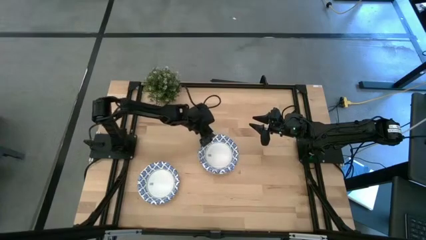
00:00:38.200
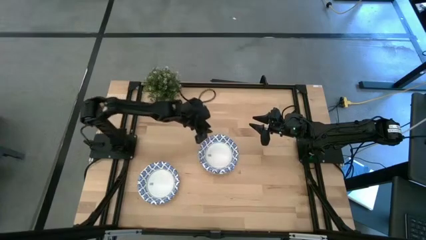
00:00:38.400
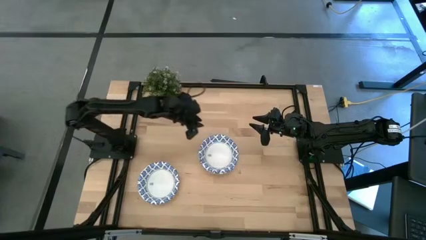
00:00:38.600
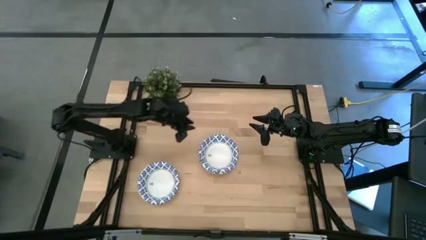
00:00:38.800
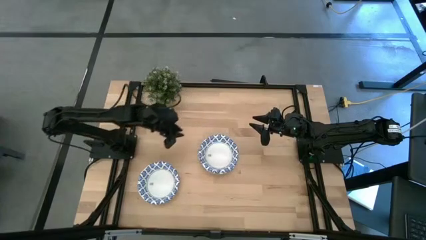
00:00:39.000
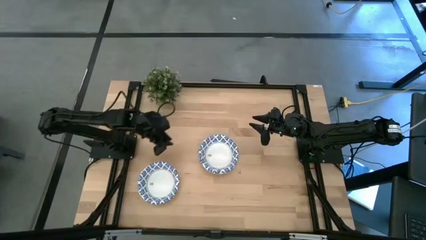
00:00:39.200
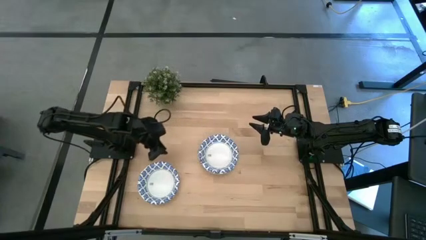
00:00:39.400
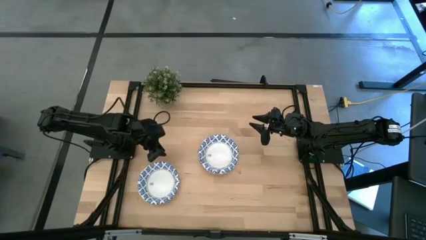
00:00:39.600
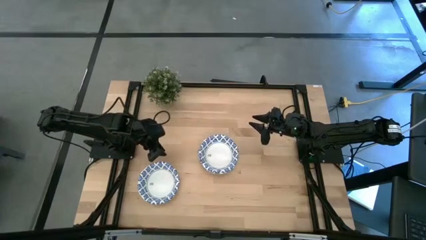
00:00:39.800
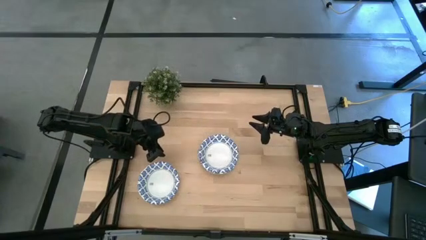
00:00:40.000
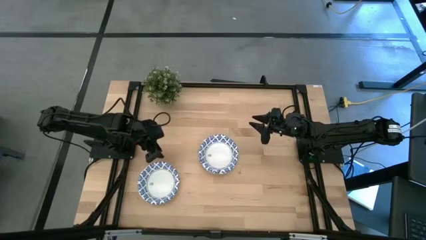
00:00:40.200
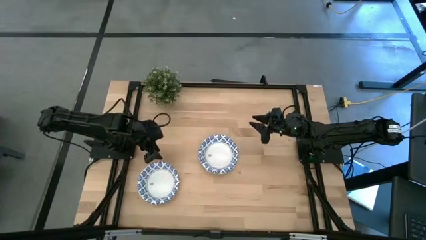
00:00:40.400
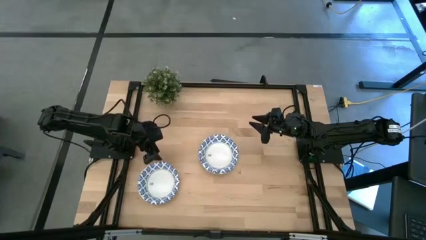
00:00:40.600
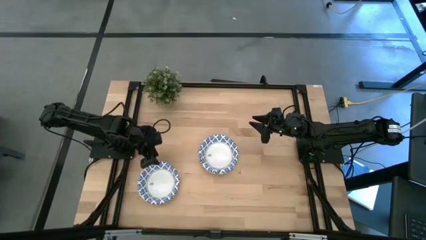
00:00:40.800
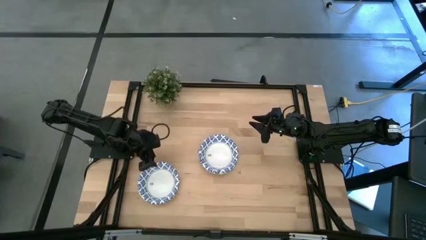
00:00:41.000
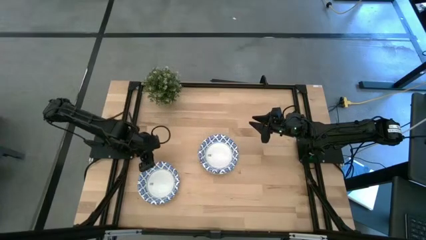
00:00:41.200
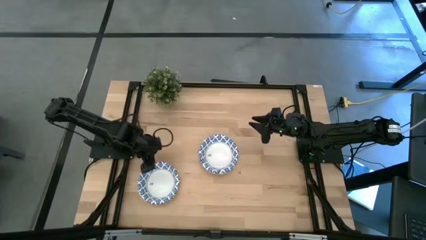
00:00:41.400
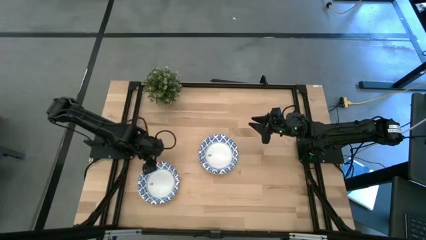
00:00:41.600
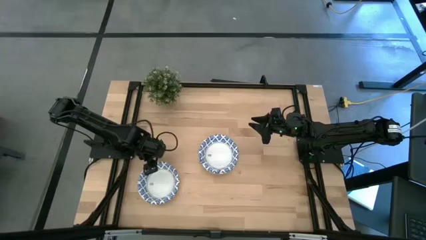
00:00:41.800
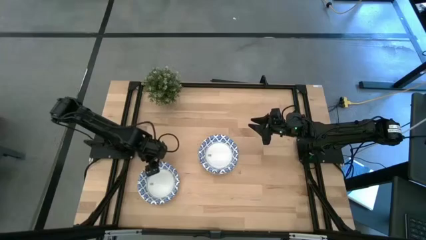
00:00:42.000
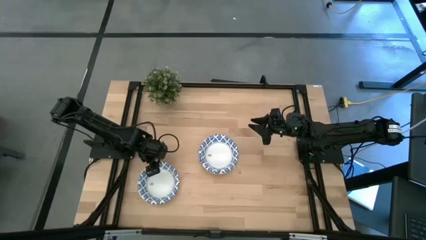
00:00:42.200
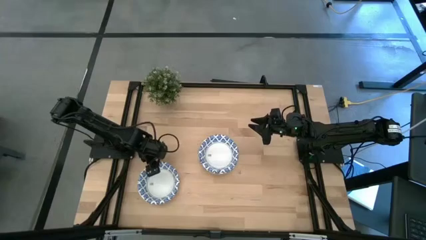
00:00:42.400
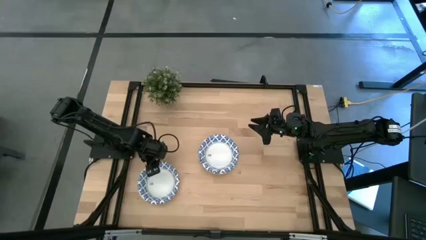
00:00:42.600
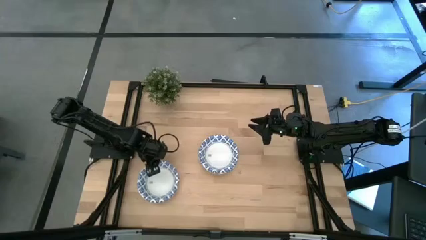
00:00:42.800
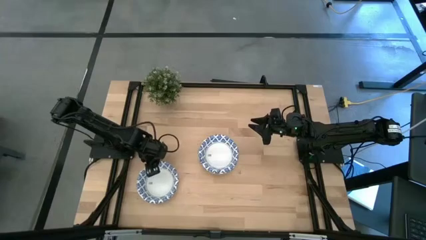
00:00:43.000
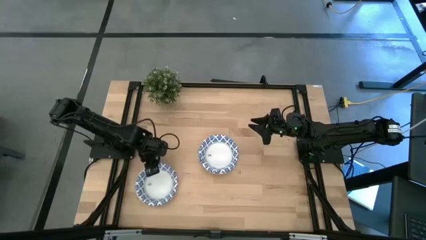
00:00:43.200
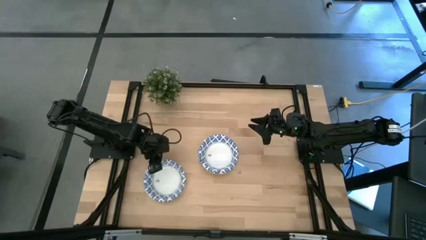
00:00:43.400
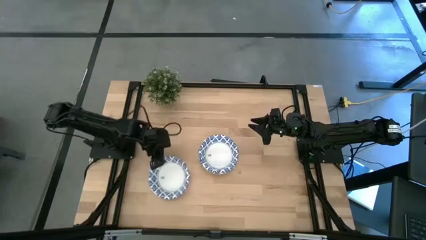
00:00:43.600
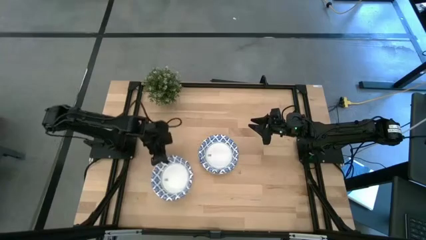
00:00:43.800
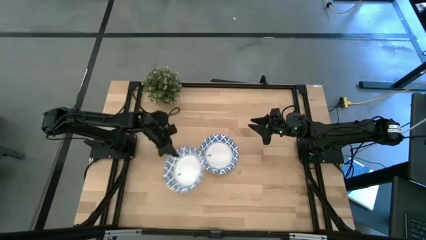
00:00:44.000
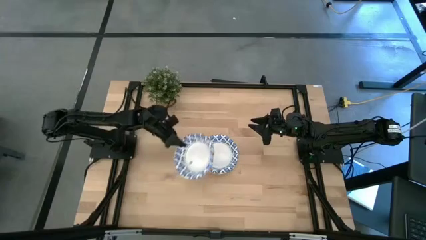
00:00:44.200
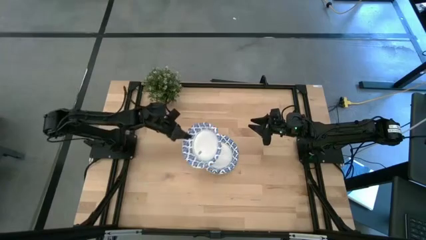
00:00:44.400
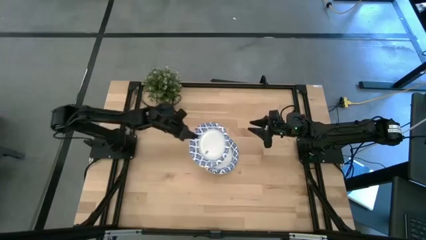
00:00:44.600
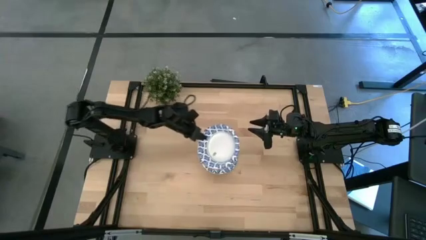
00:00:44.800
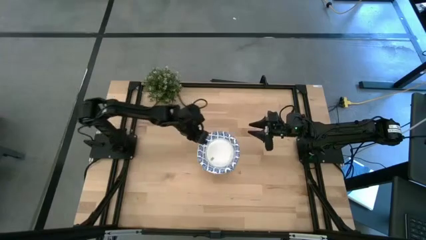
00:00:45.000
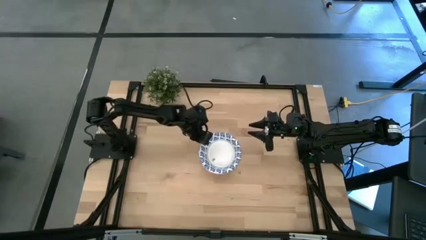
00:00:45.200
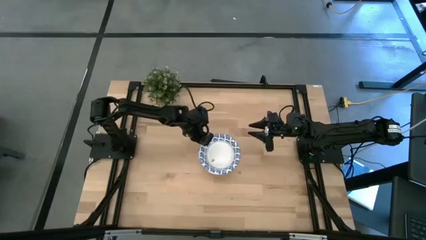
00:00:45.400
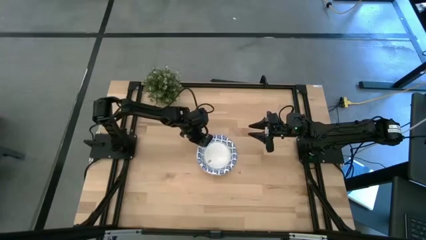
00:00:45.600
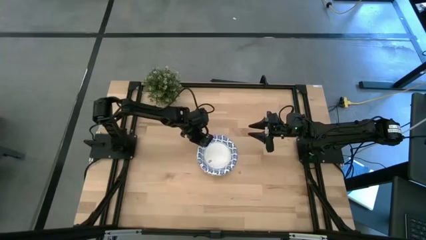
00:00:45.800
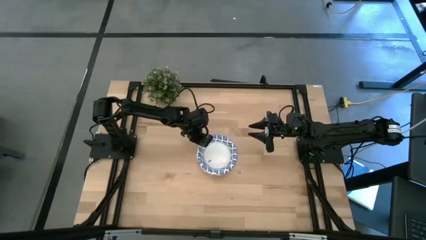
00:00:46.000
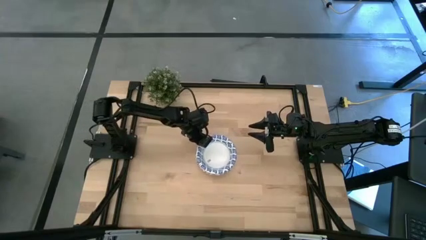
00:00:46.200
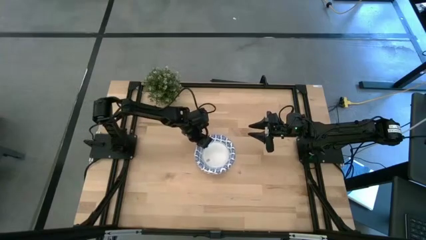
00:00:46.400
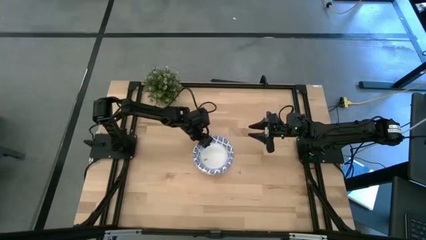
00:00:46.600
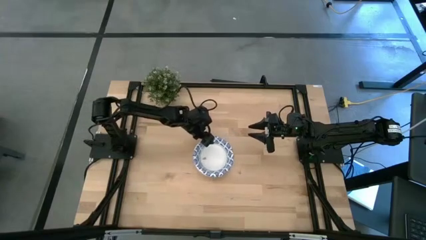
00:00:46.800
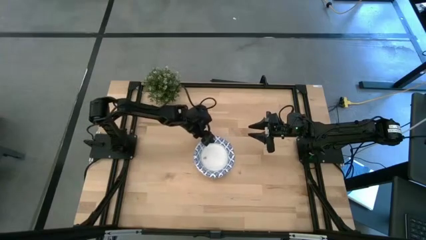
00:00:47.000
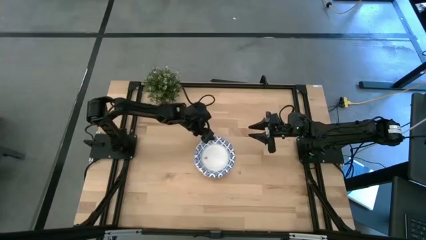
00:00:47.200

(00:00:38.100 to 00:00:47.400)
Task: Nest bowls inside each other
Stack the white bowl on top of the other white bowl

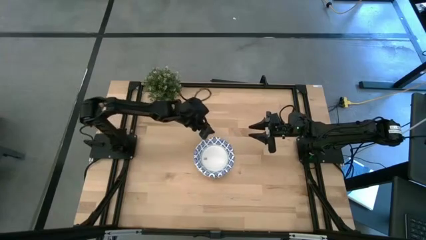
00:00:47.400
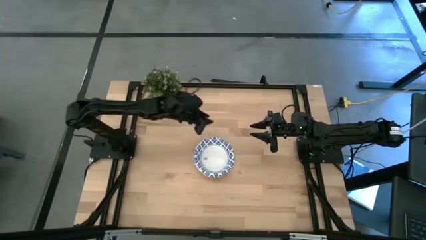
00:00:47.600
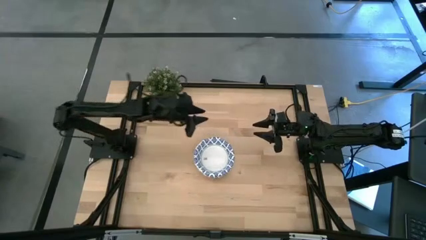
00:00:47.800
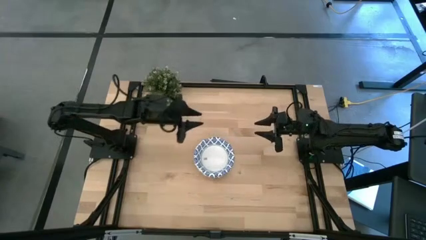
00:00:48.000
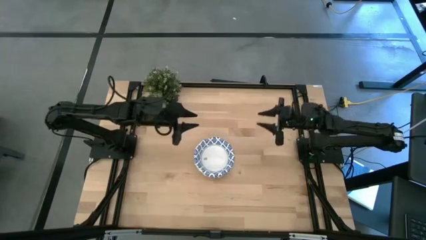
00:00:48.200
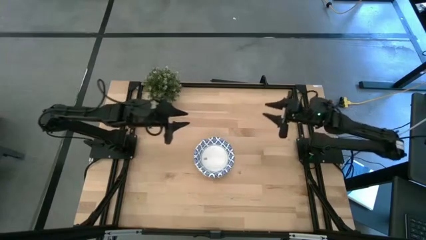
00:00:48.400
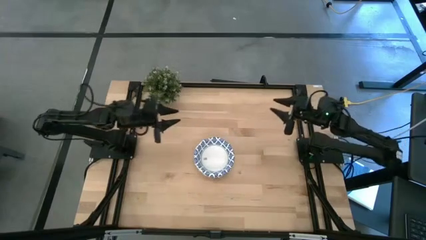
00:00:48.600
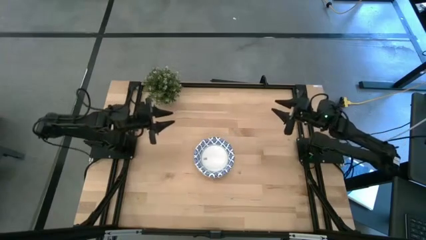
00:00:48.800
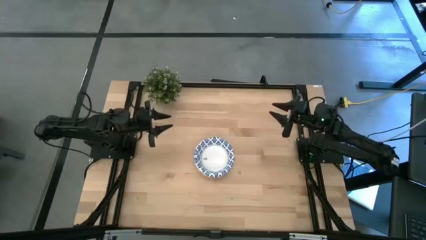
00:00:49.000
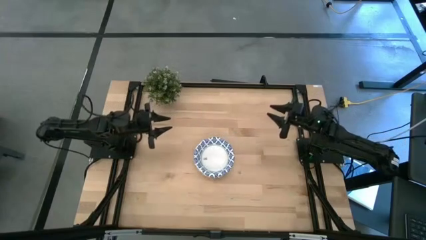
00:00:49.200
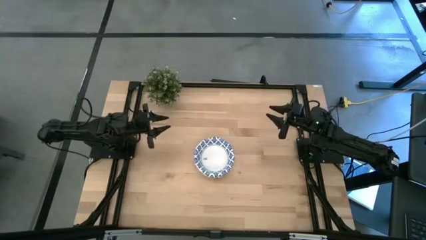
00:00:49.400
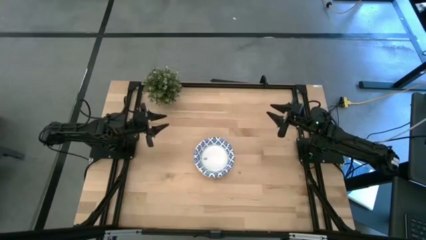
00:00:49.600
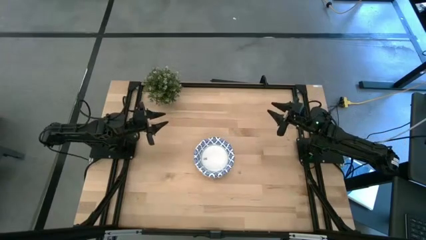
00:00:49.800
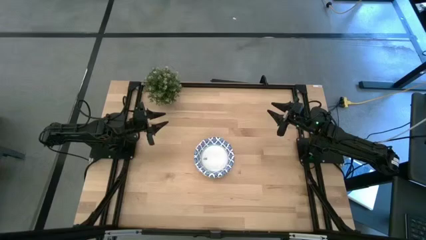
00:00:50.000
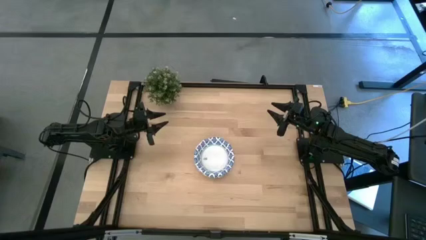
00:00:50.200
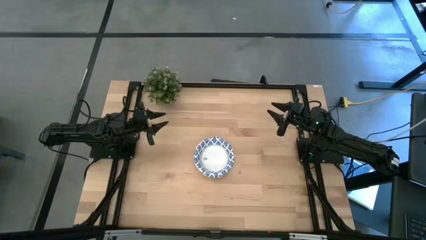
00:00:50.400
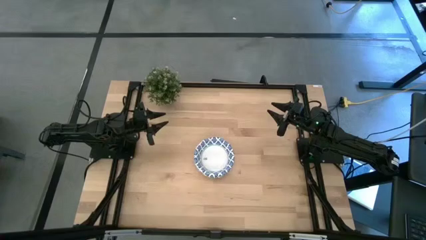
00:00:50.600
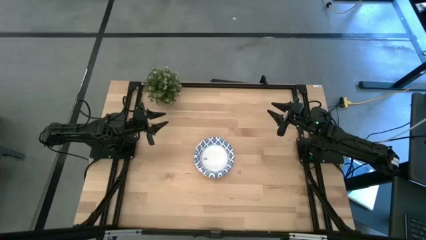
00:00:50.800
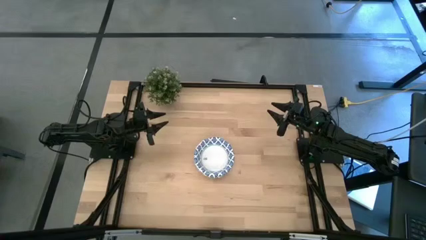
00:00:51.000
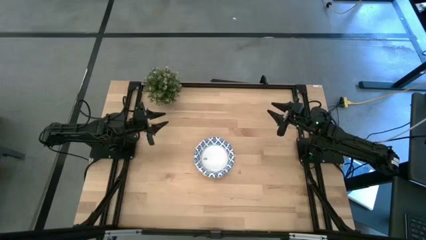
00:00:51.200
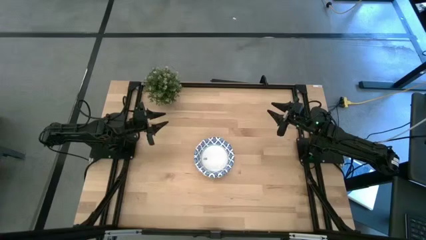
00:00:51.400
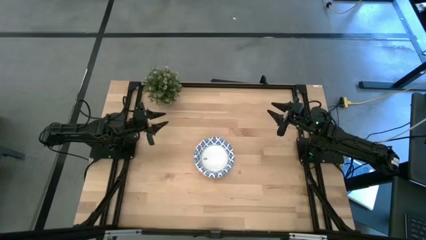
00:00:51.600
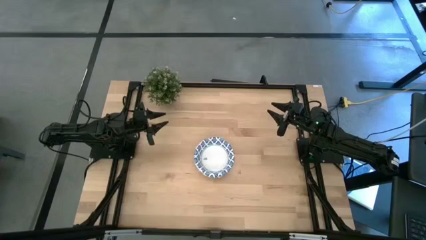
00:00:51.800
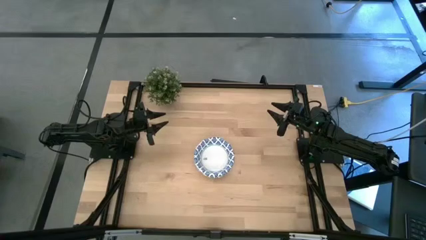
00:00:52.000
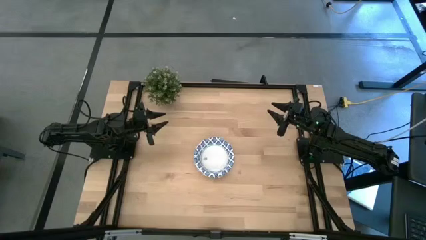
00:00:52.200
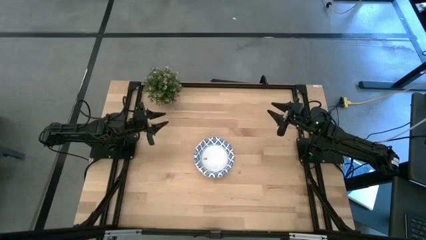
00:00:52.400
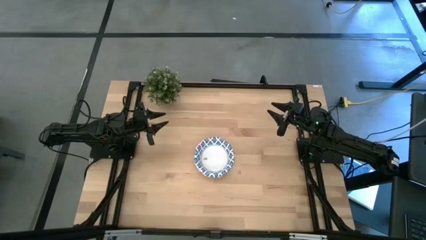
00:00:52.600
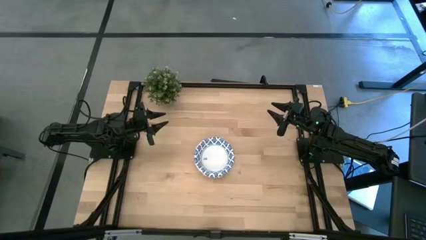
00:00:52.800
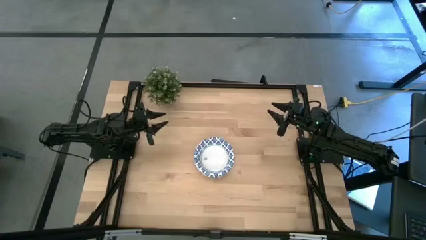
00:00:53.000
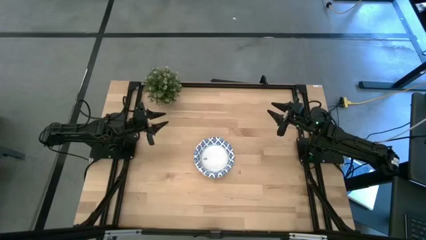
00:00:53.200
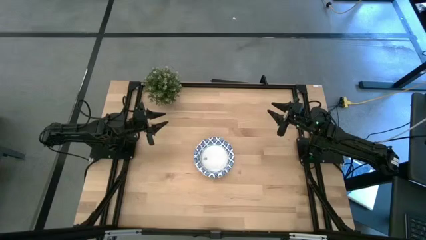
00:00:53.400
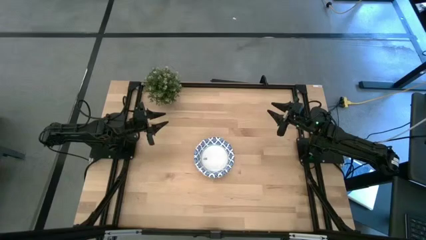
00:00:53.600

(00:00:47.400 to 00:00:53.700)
Return to Home Position
